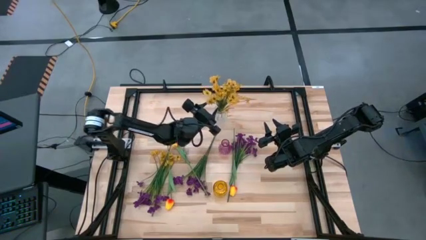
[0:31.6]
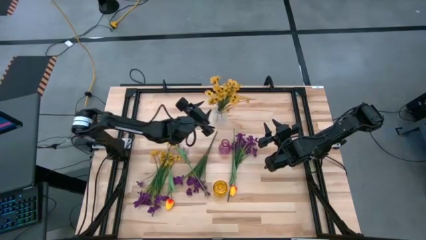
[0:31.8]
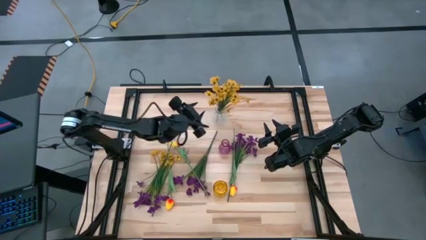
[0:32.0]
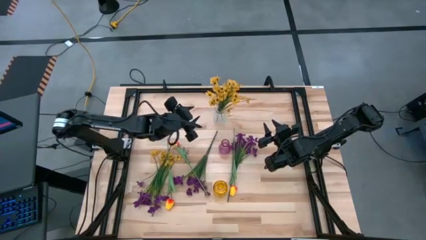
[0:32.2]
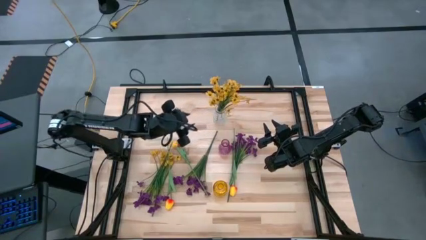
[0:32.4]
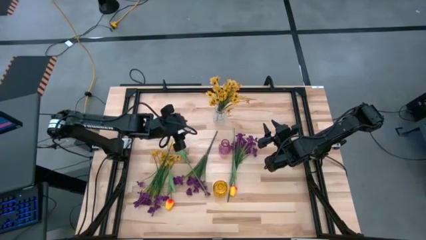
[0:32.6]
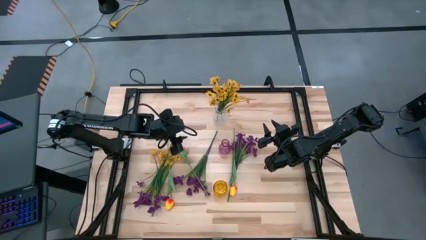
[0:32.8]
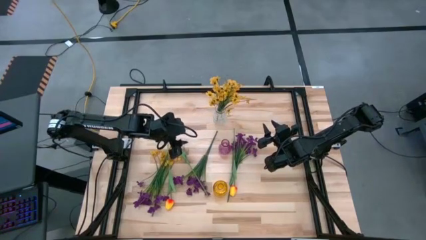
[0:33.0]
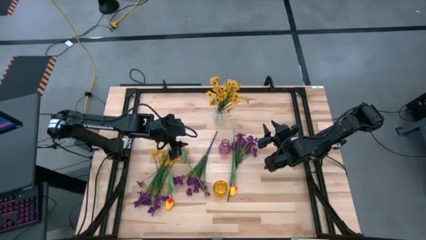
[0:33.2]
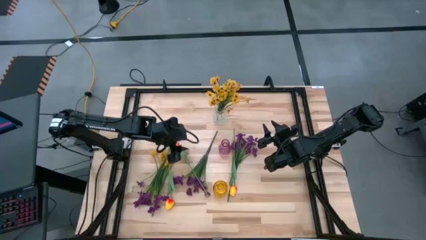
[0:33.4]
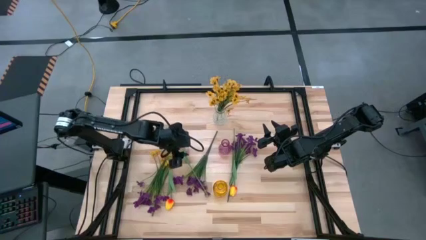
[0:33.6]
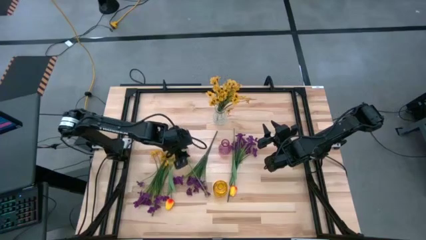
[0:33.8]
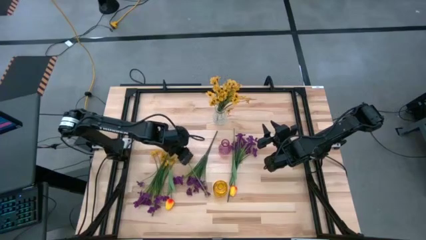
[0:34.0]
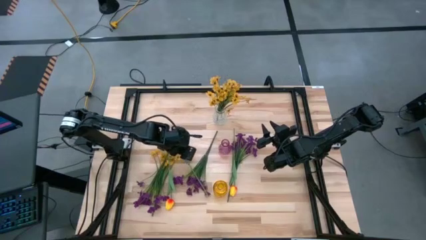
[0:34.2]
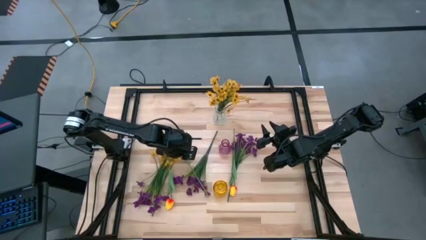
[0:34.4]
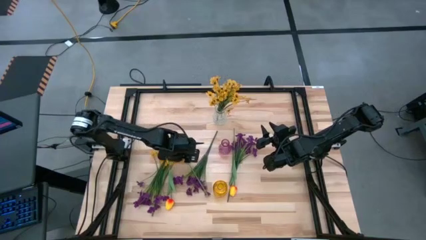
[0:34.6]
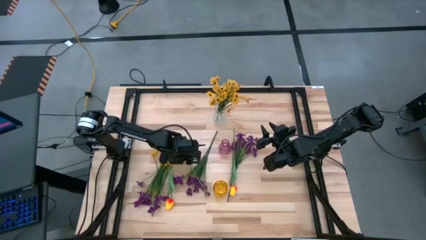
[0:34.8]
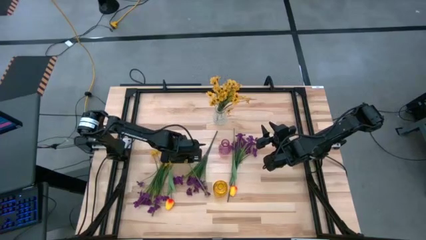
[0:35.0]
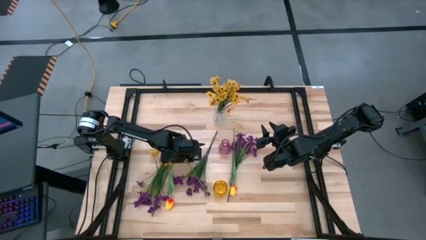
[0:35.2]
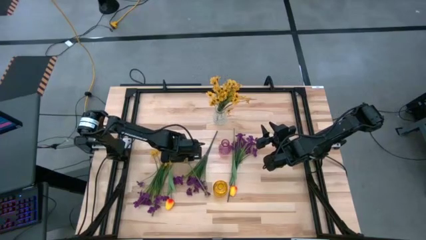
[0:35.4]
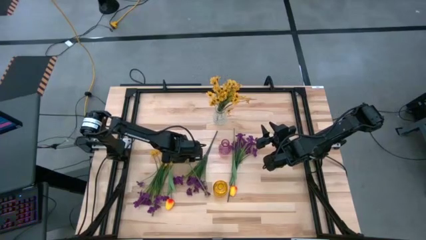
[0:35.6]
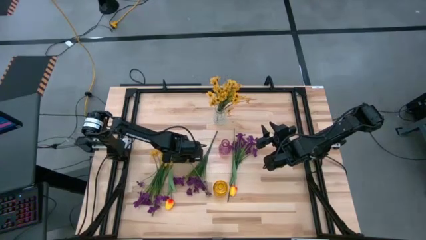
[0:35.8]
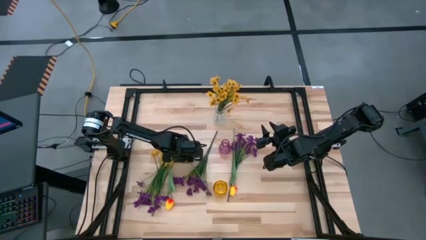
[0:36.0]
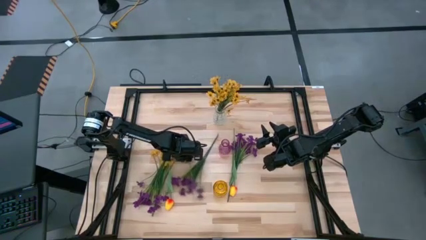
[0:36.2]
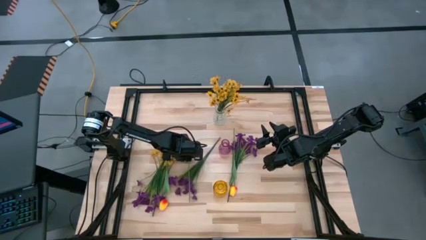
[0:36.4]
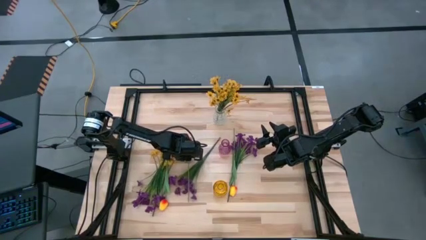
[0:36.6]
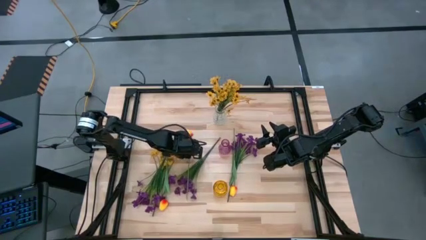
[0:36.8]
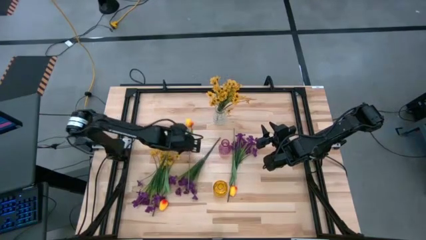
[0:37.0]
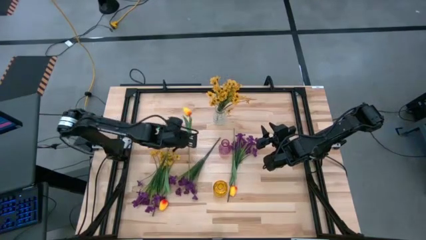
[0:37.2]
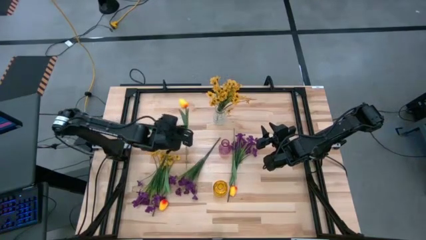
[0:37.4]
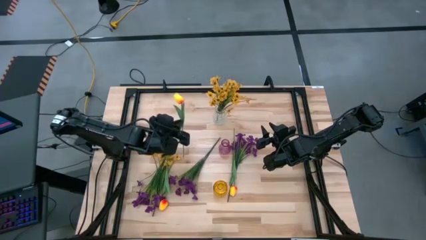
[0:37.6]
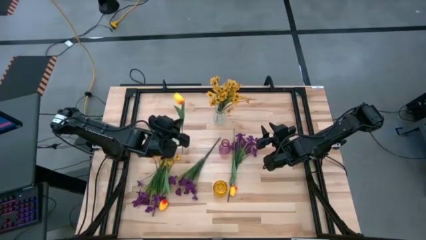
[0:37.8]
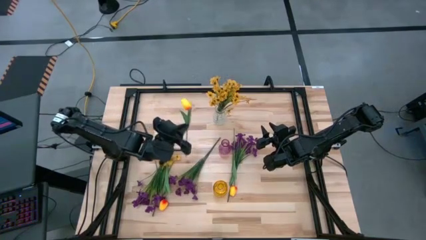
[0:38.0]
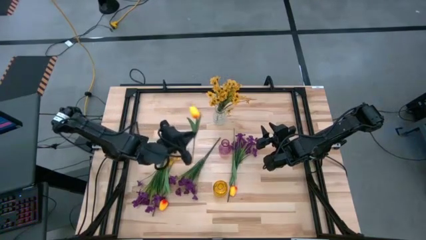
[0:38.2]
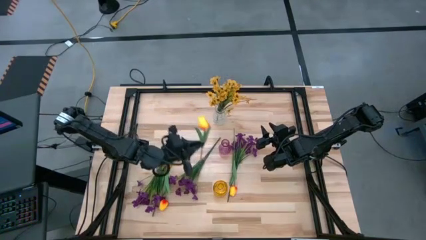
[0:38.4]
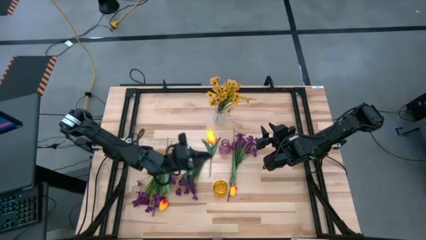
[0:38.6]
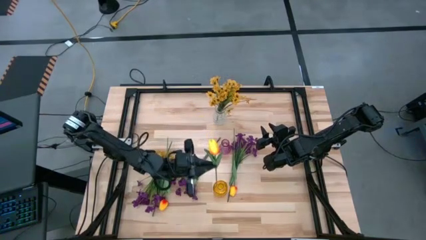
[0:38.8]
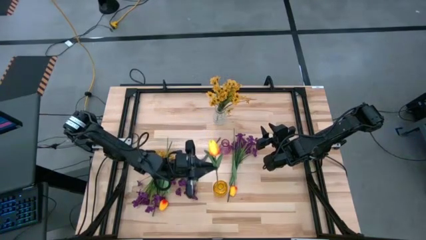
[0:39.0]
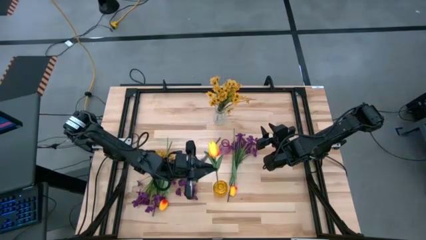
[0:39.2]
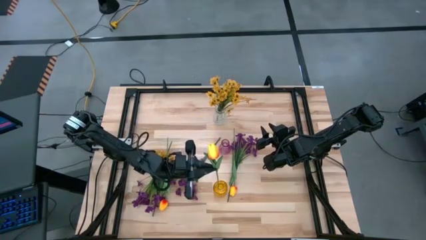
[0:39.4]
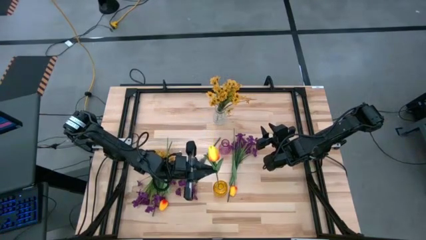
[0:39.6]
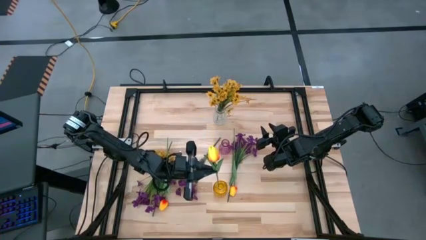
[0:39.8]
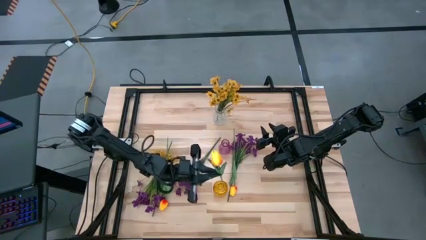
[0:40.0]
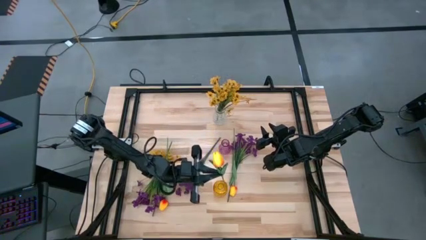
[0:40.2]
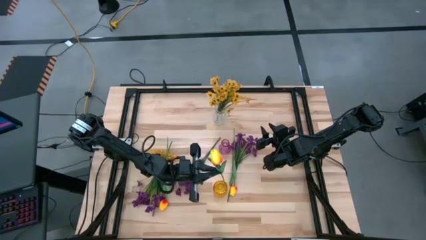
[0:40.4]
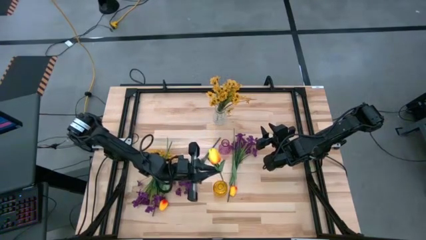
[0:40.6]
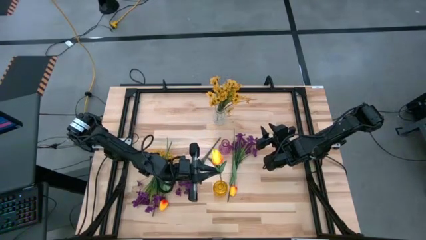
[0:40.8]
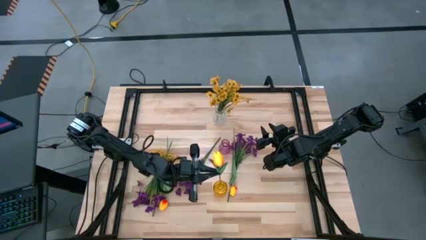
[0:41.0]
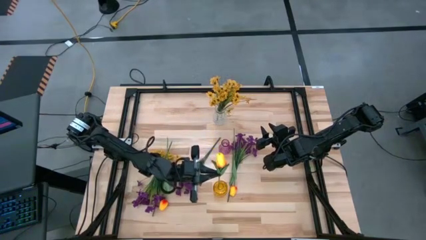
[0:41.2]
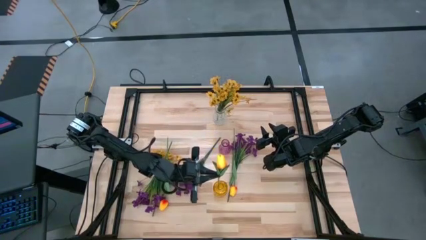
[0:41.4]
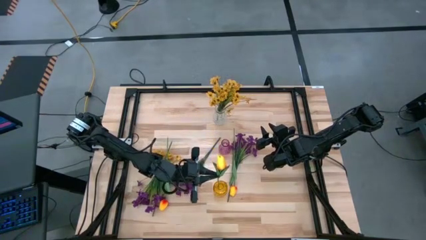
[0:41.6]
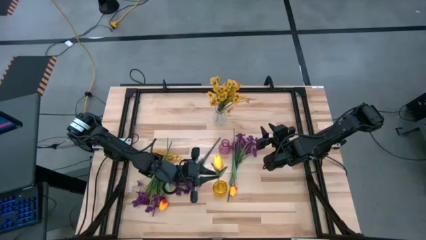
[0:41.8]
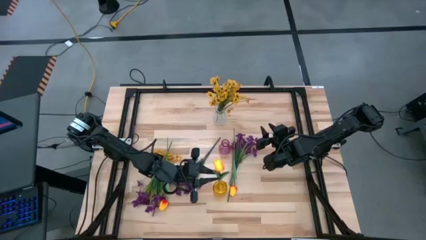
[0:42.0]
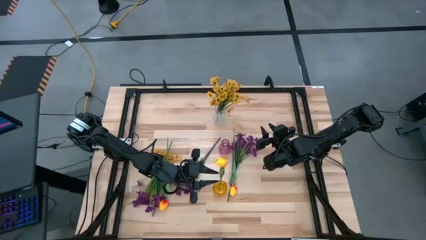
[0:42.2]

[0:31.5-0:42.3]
Task: Sort flowers into vase by color
Put the middle yellow tulip into the yellow vase
